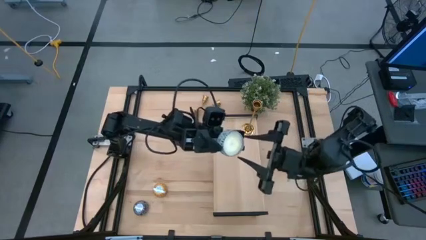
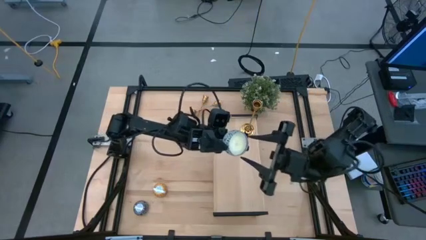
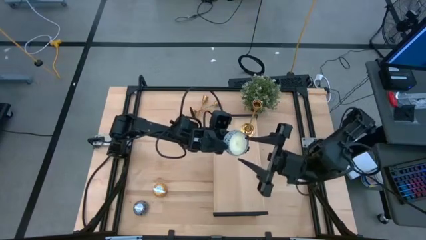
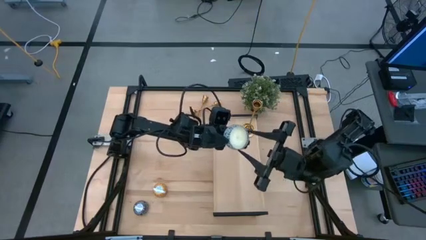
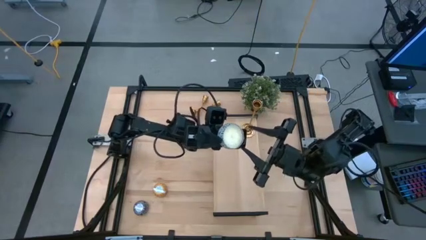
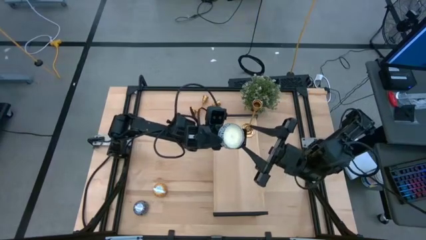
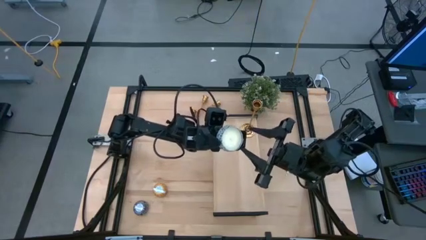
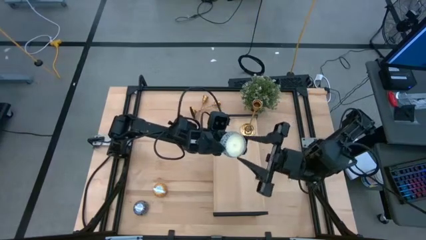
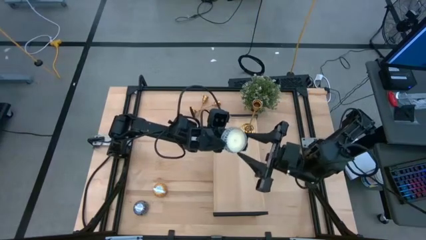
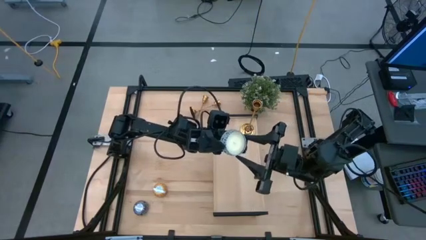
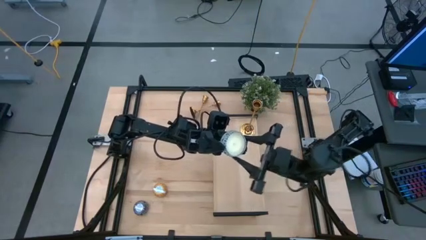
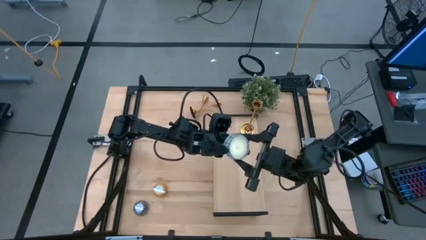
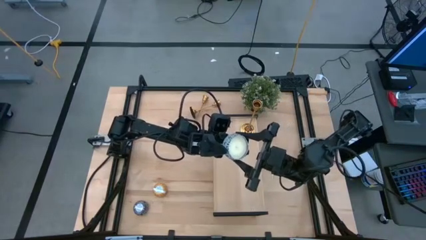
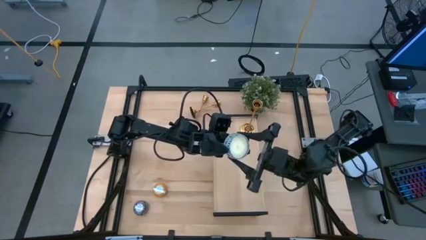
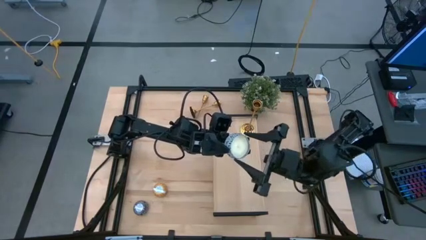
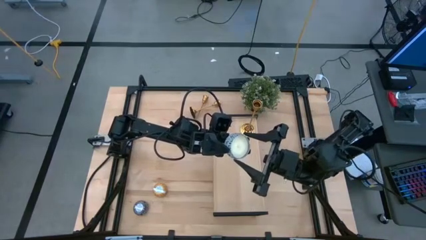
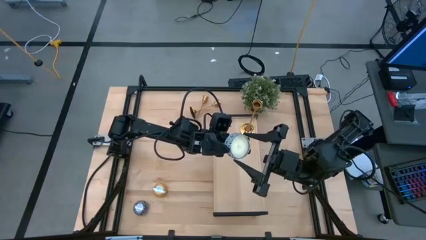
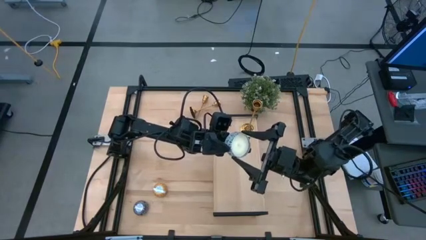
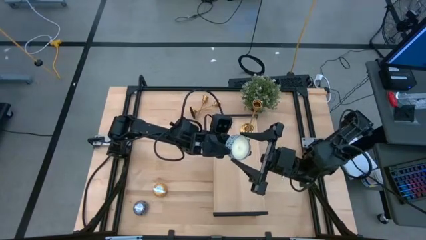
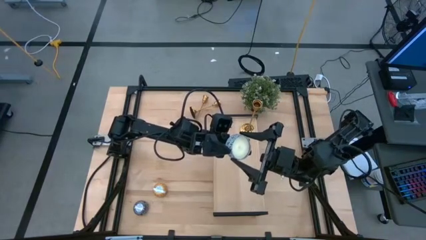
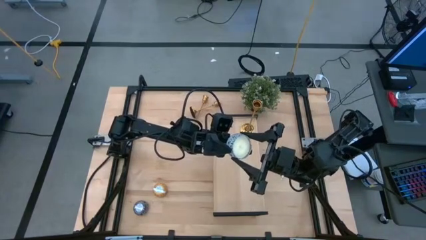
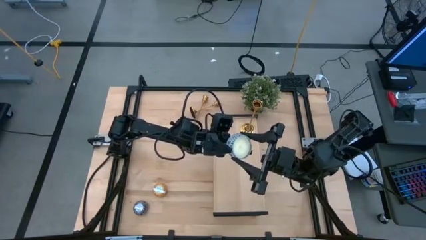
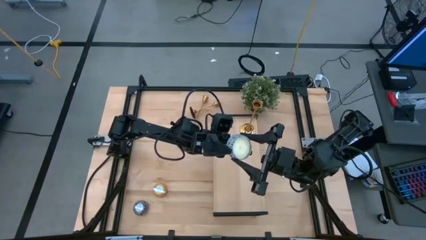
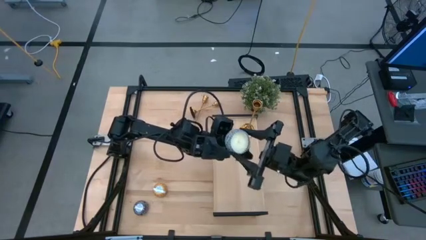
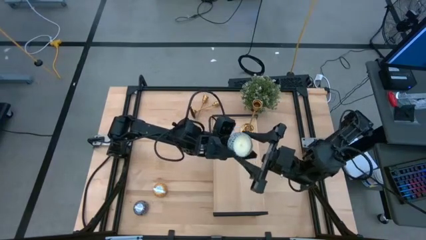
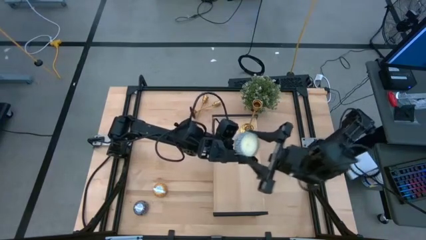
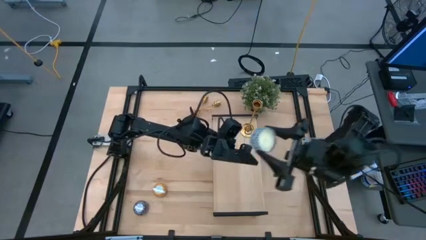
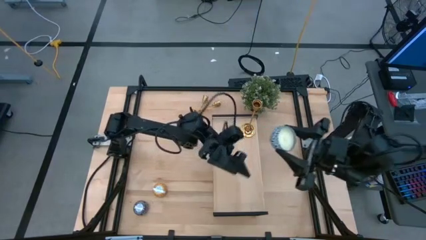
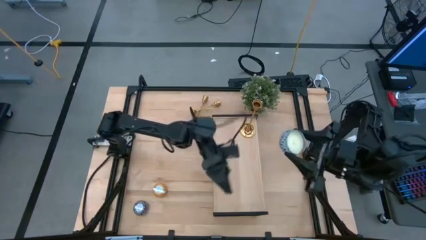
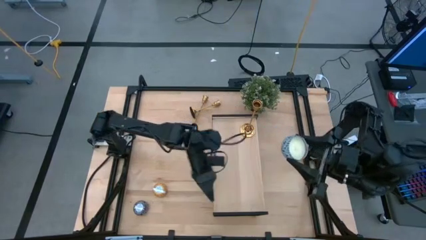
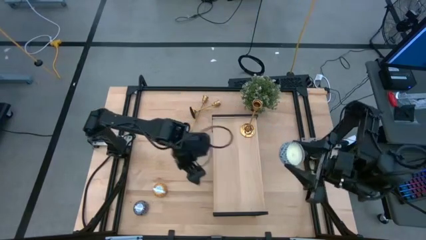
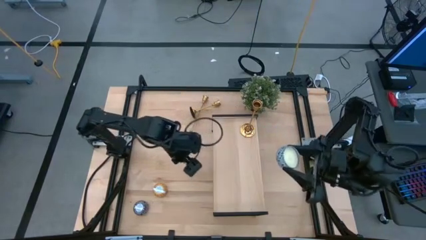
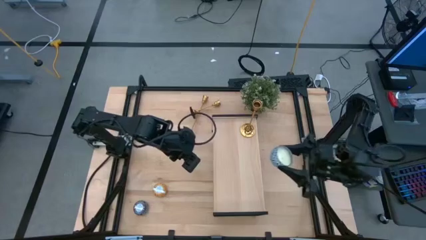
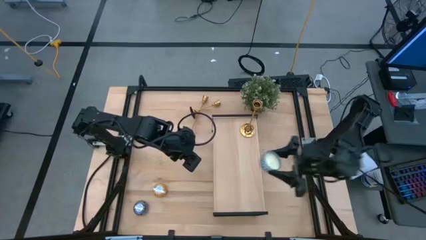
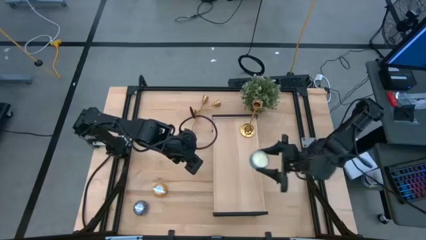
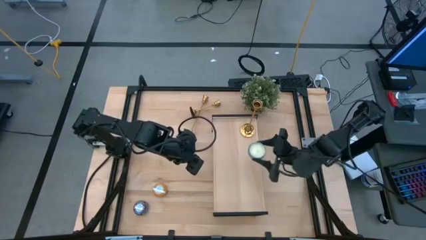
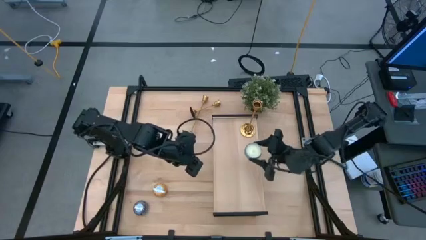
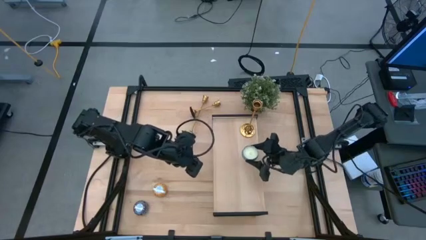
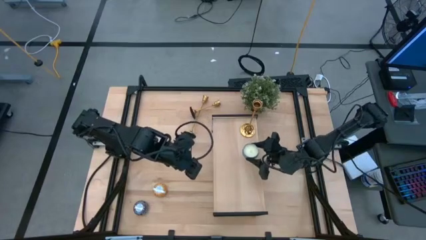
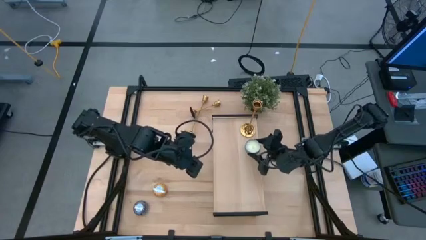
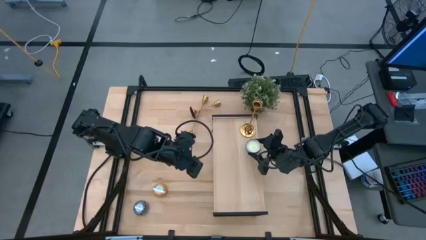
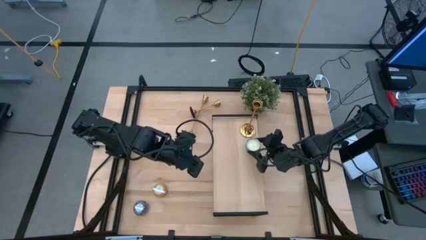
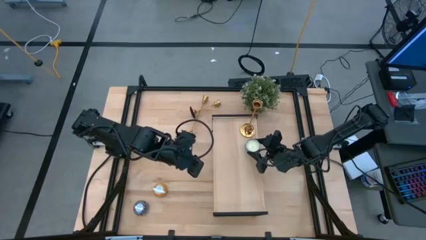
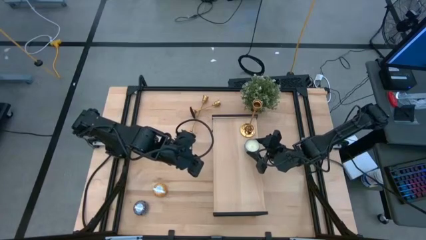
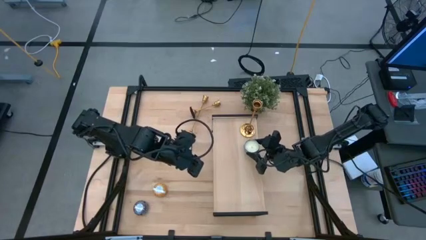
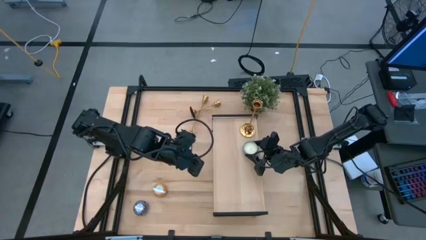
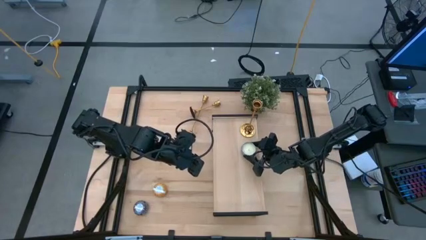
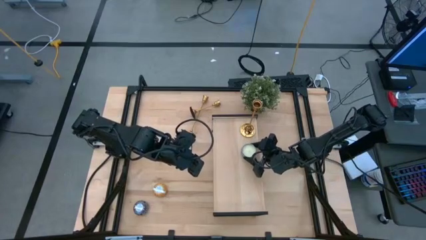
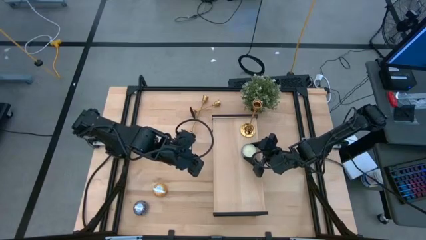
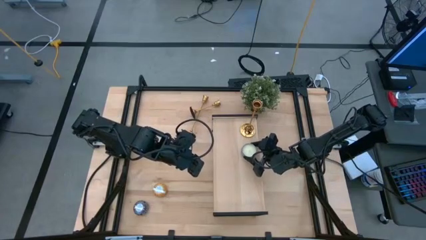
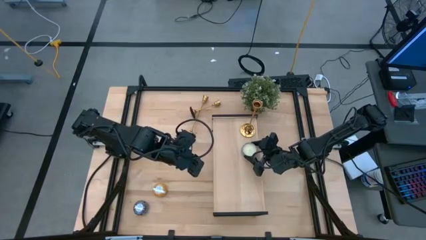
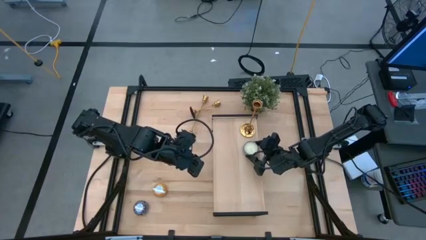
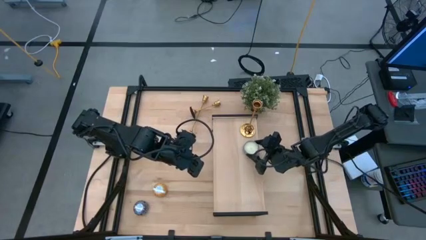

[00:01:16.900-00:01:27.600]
Task: Pick & Place candle stick holders
Put the green patterned scented candle on the shelf

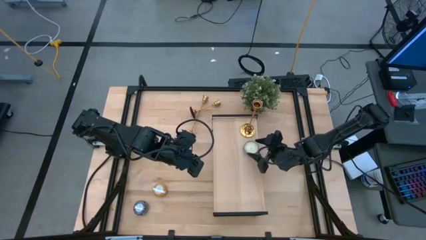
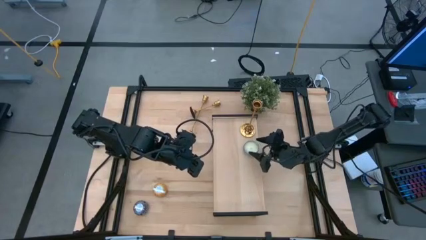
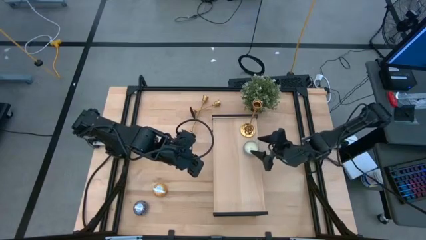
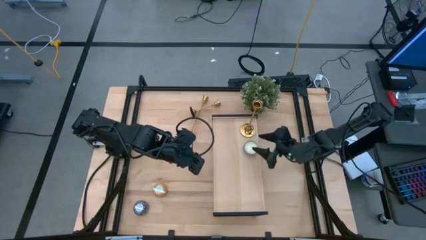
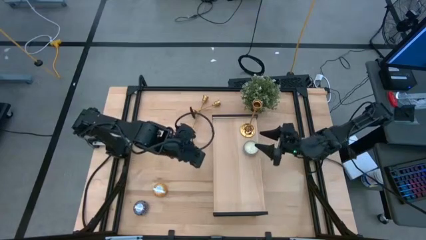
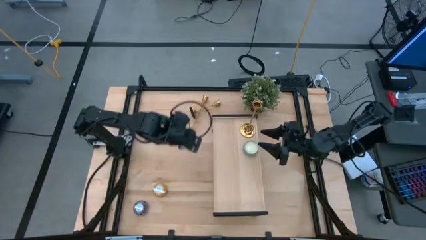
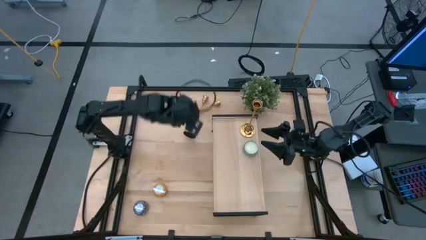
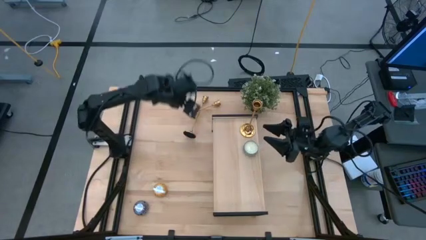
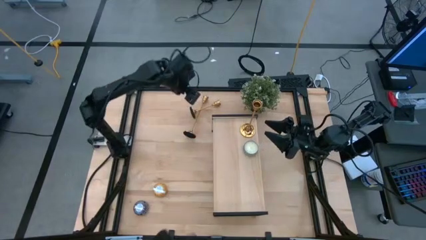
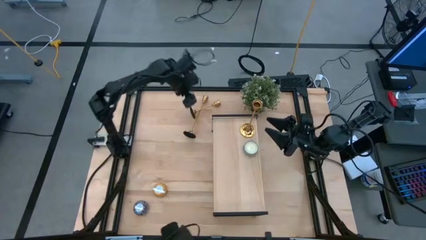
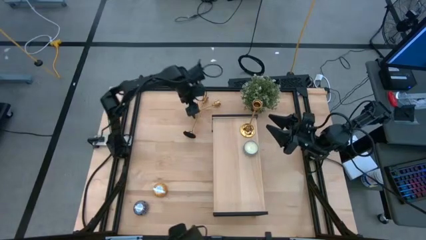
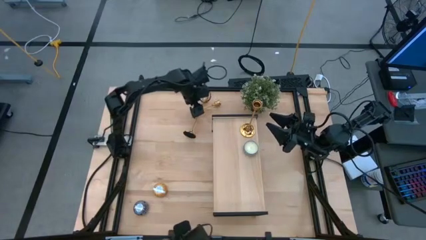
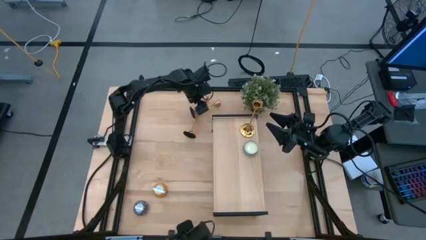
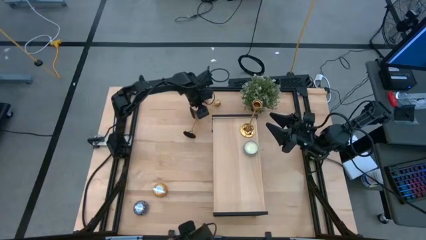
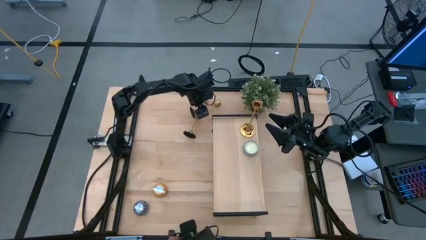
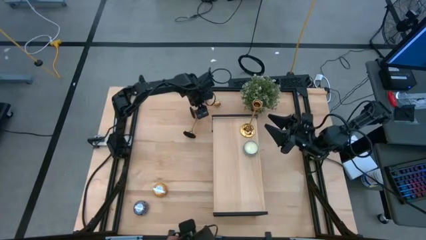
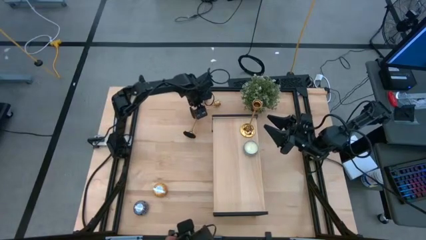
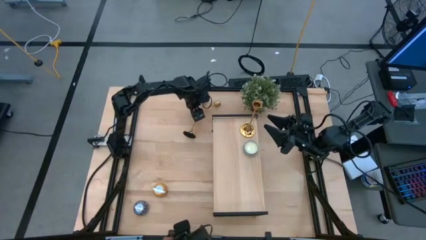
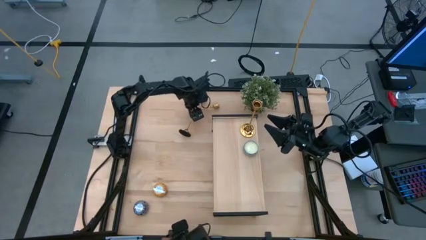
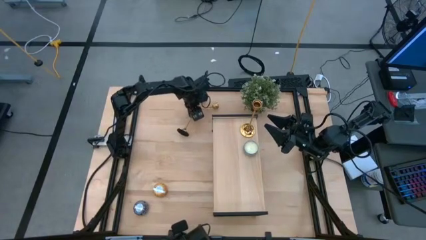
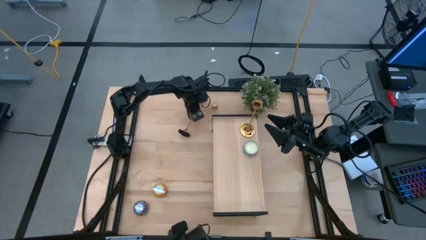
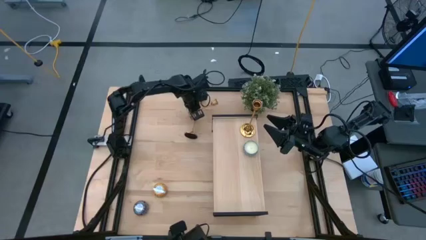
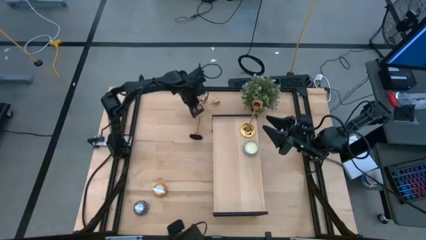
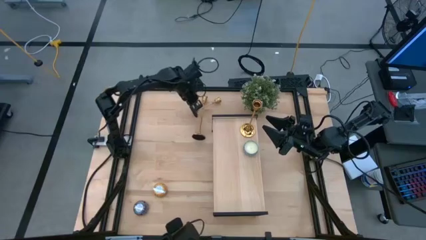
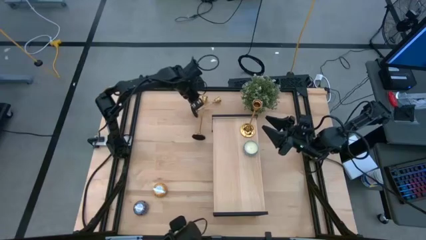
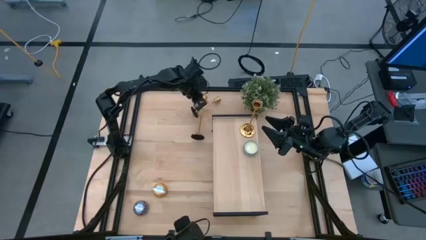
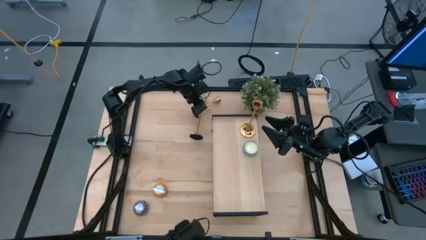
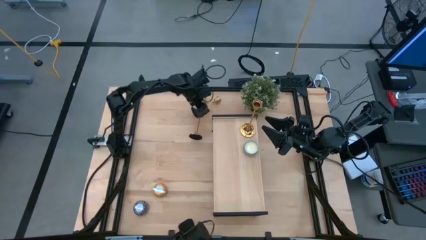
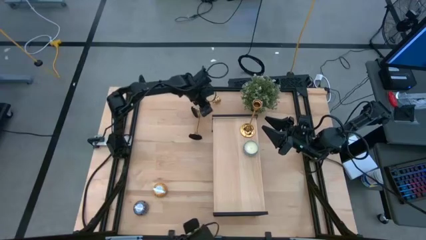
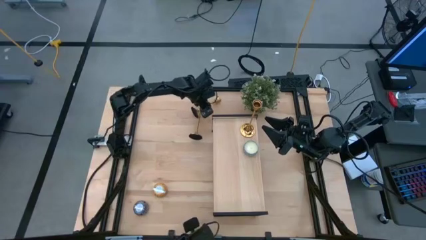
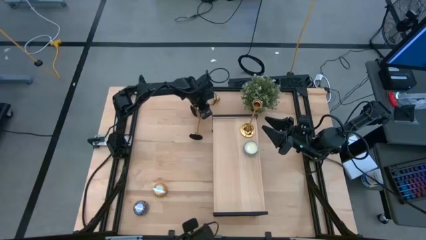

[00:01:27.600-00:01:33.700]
Put the right gold candle holder on the shelf
